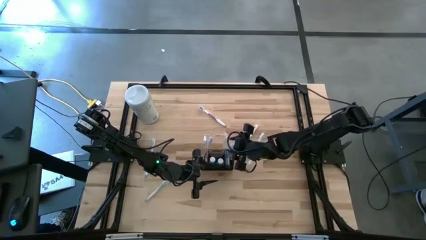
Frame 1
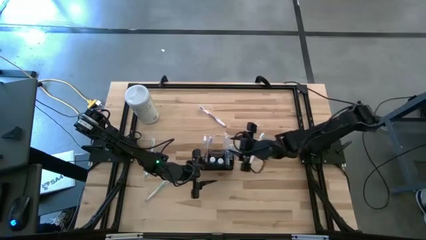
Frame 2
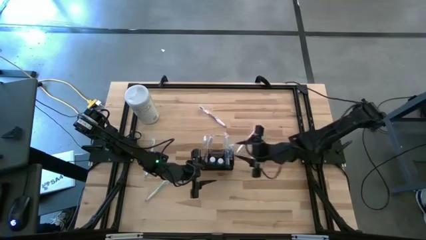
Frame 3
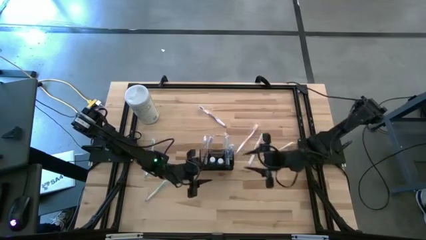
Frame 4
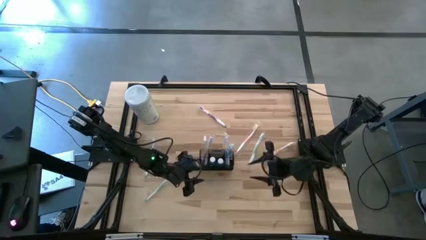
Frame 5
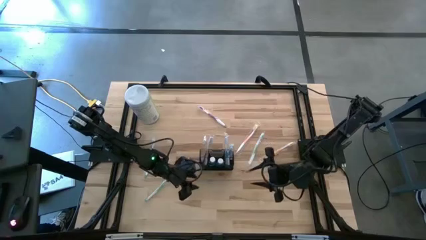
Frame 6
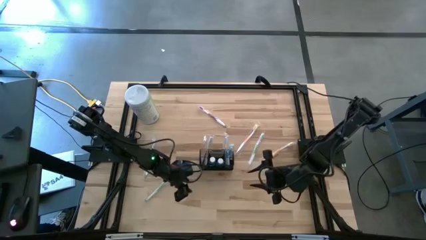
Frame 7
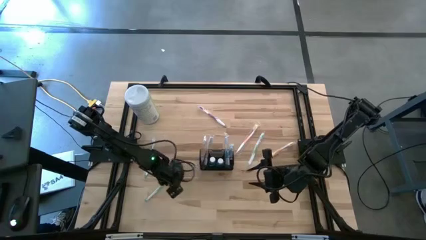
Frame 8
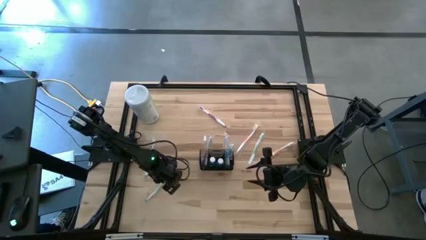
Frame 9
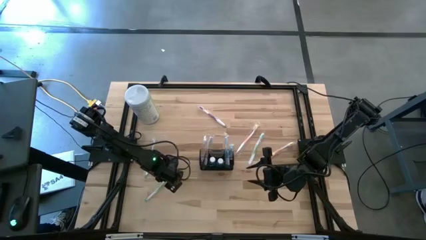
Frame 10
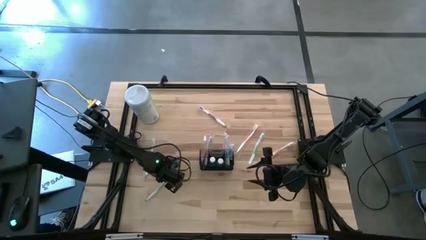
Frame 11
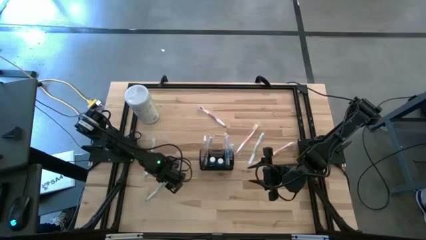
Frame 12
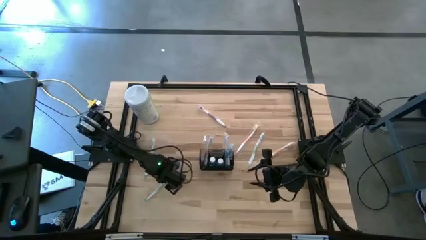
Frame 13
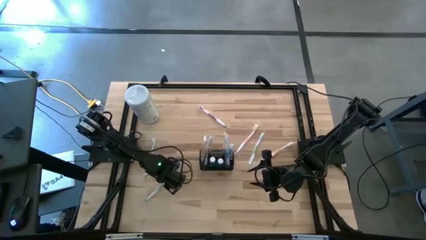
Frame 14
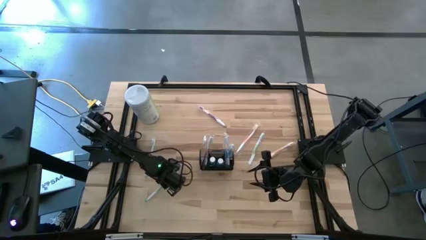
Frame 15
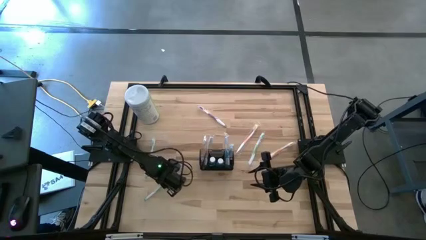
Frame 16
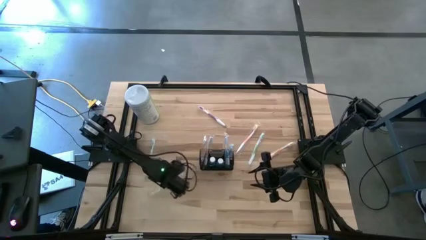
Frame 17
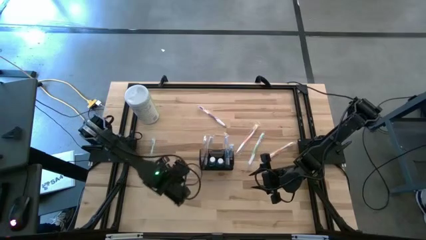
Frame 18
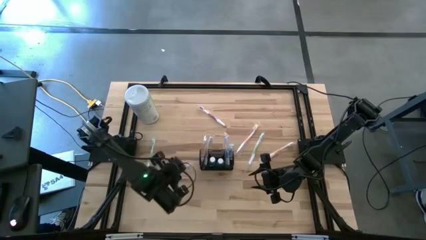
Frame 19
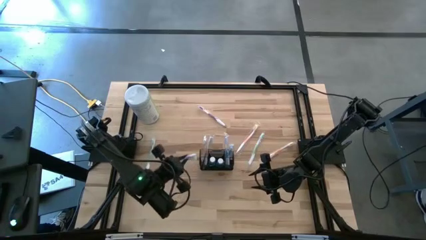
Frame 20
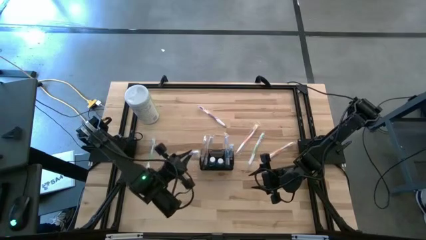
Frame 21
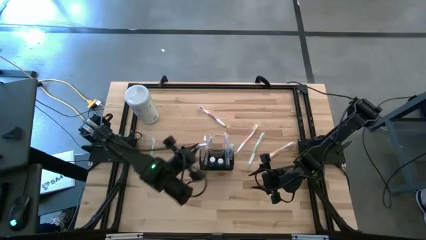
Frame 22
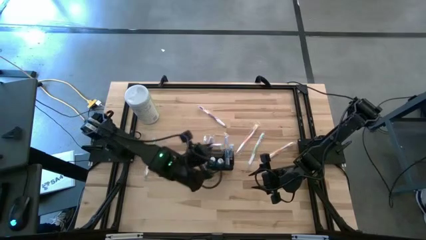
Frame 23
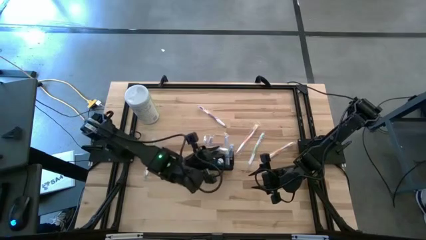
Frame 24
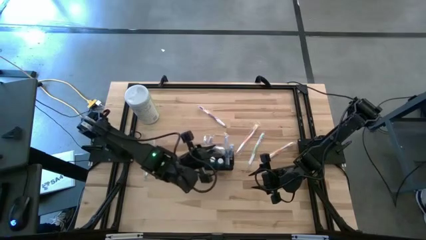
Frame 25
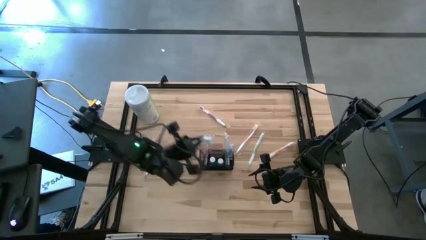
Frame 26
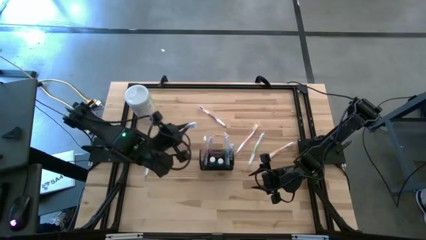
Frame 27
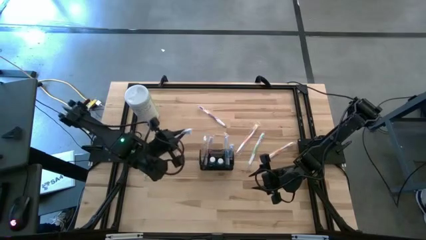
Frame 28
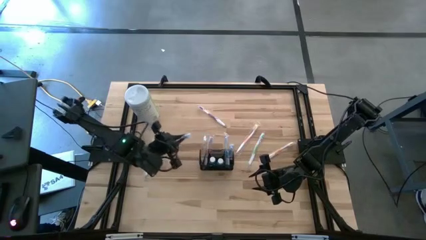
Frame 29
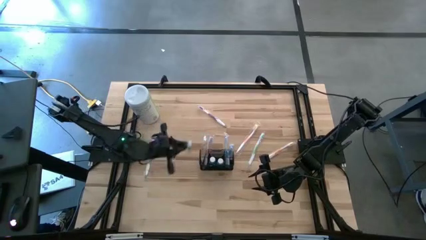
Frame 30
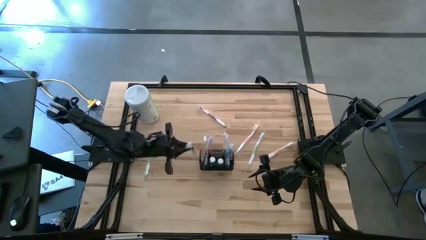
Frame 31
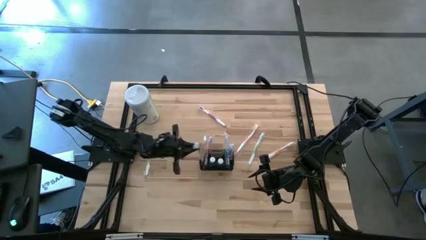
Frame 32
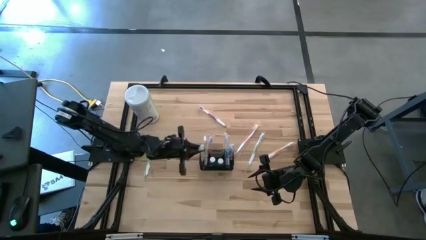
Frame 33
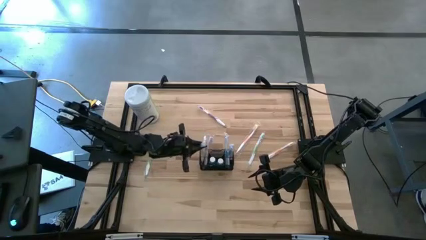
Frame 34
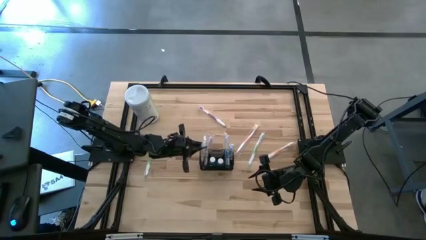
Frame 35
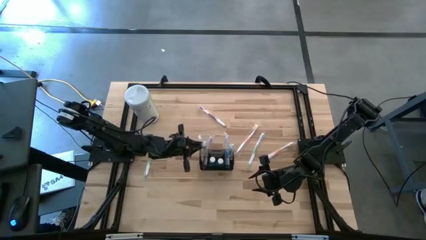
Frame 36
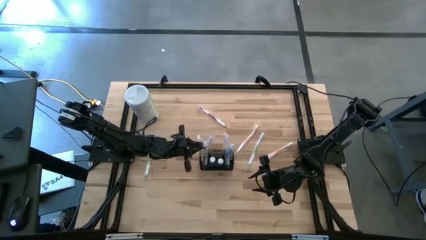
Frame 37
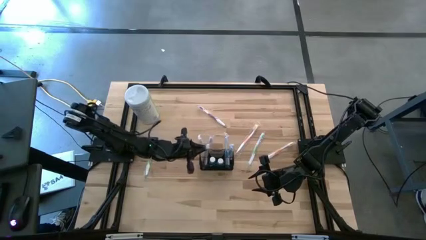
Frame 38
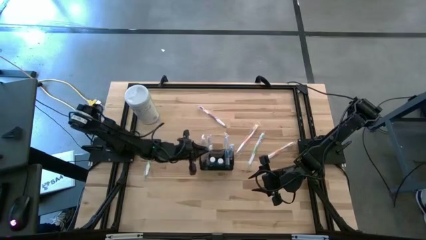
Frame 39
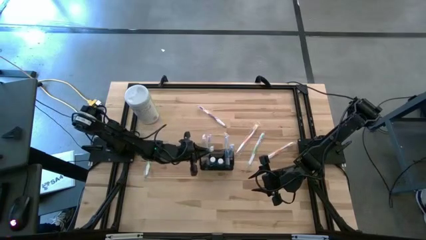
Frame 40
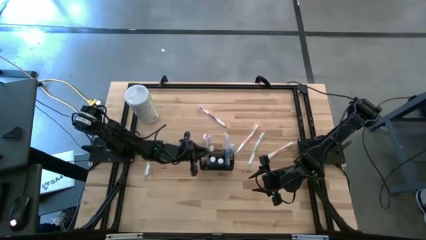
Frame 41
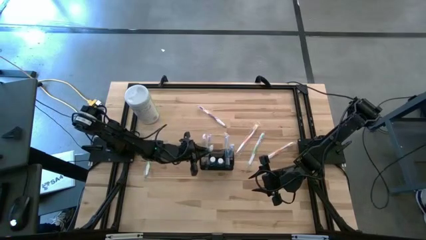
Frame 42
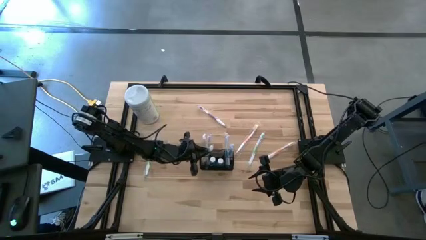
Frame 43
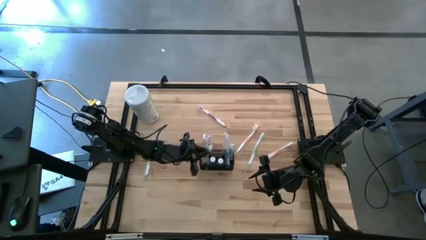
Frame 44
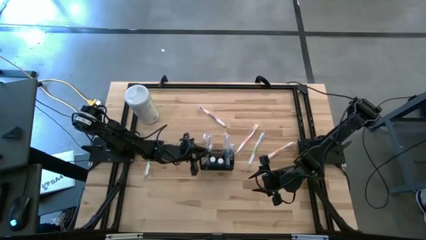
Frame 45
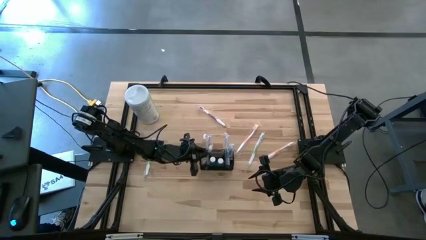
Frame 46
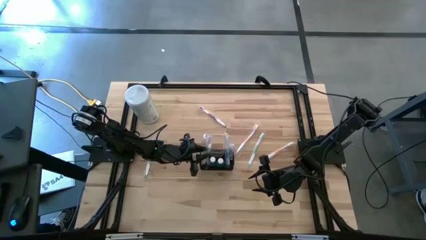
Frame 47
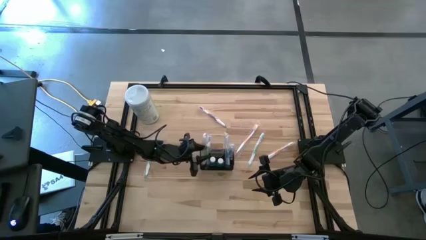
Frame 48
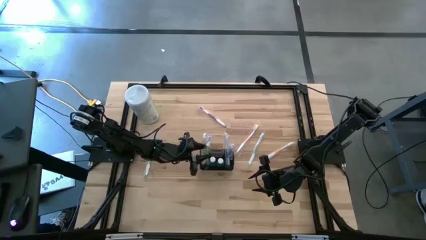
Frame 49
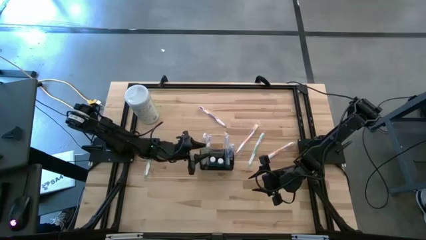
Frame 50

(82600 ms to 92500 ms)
Task: Pick & Place toothbrushing station
Put the bottom green toothbrush into the black wire organizer

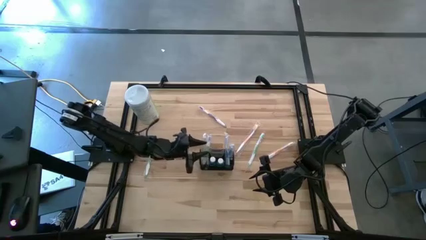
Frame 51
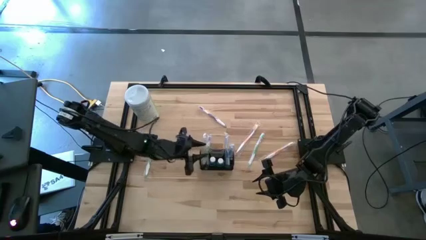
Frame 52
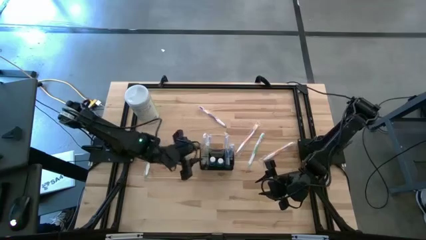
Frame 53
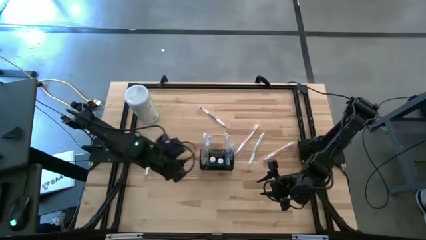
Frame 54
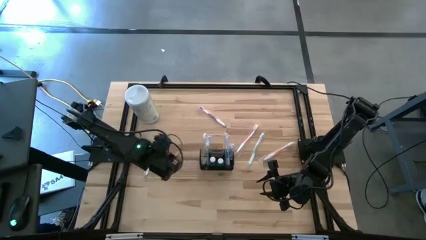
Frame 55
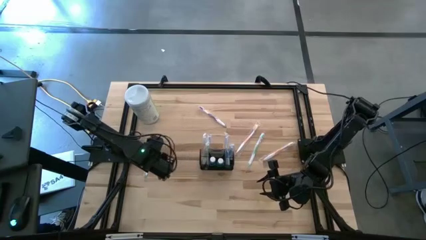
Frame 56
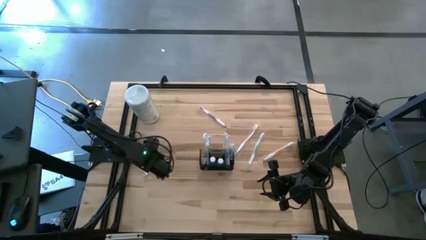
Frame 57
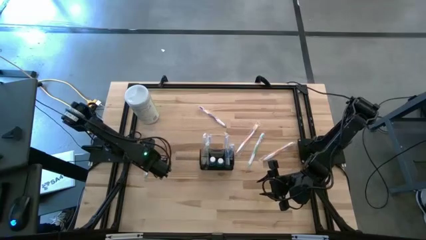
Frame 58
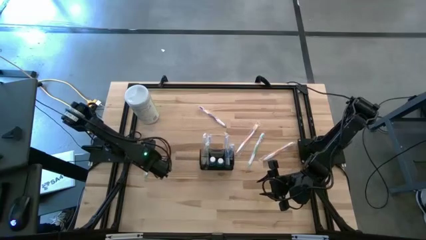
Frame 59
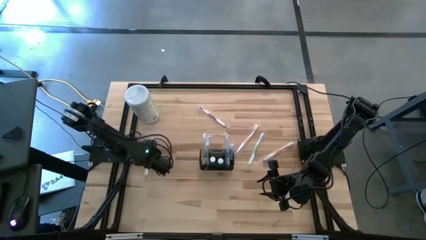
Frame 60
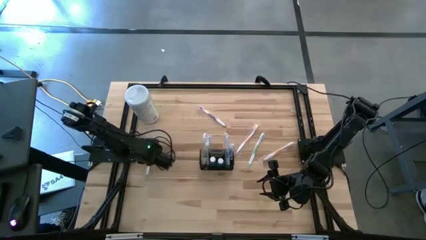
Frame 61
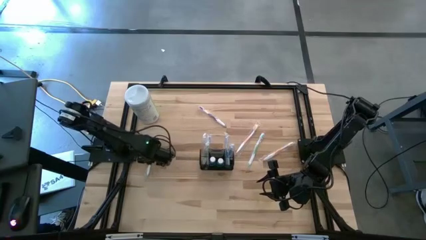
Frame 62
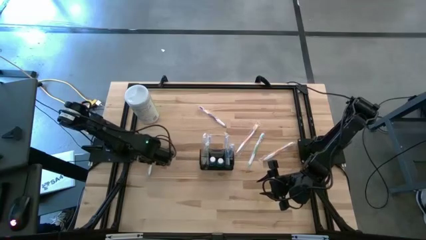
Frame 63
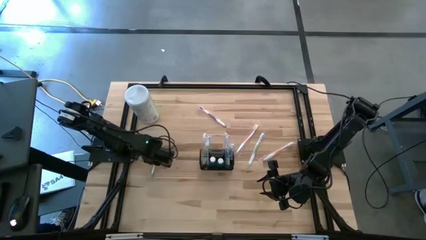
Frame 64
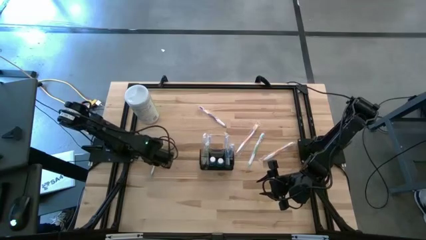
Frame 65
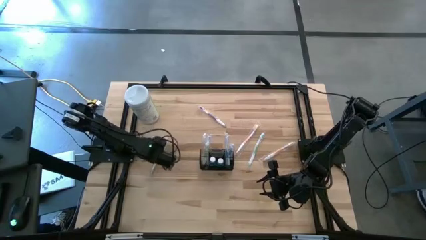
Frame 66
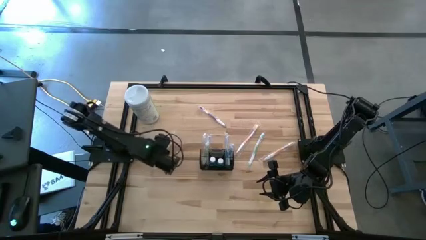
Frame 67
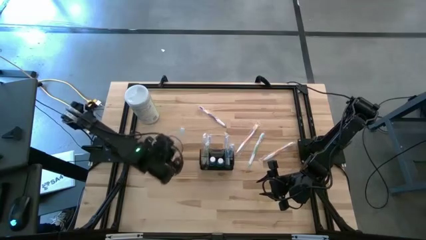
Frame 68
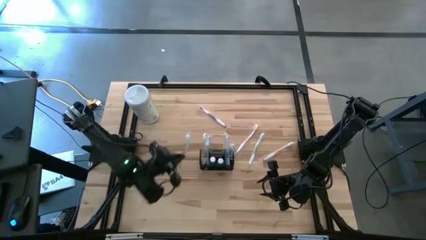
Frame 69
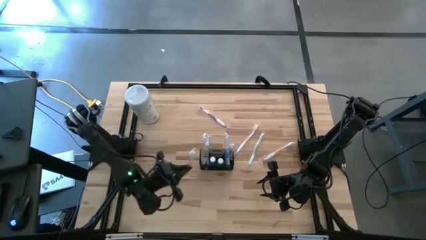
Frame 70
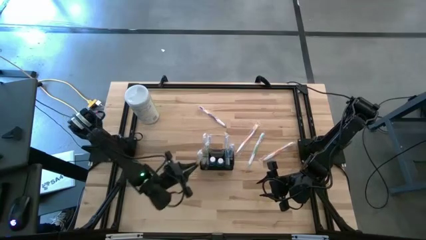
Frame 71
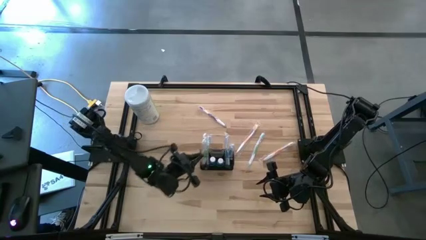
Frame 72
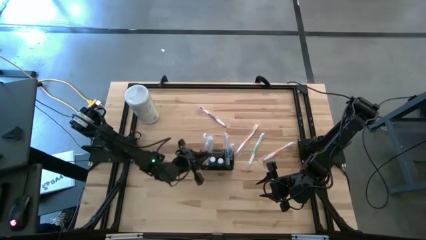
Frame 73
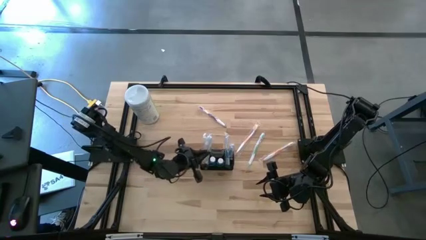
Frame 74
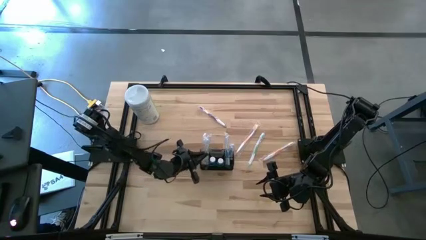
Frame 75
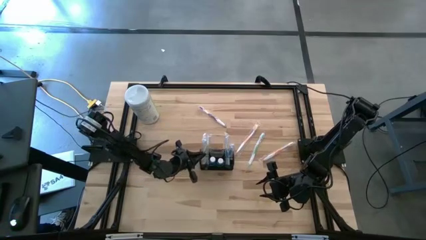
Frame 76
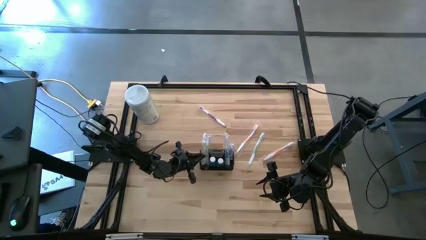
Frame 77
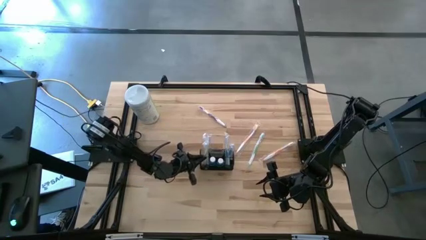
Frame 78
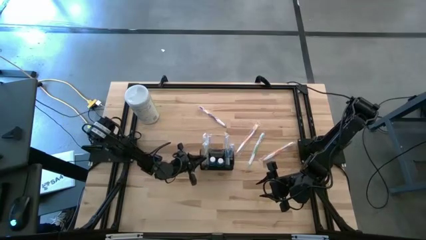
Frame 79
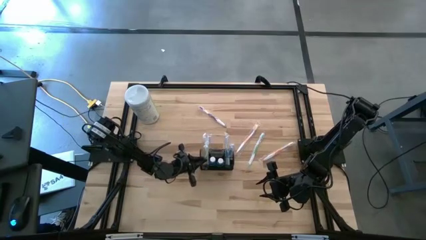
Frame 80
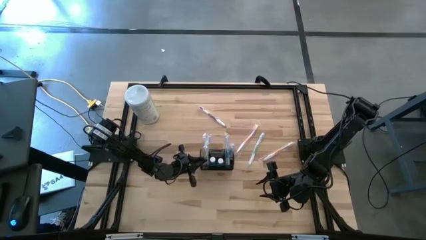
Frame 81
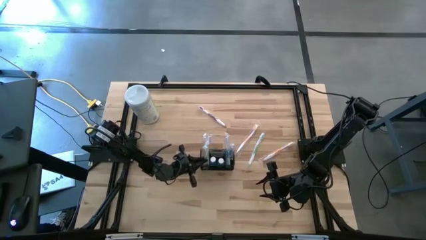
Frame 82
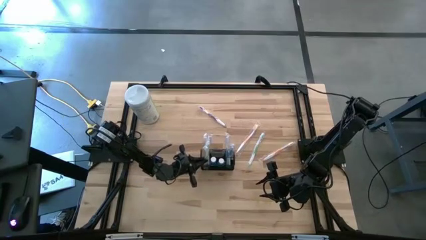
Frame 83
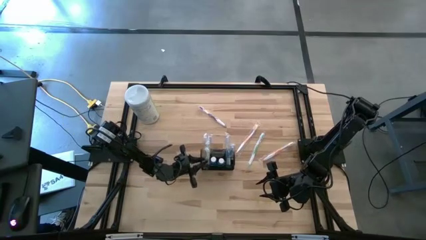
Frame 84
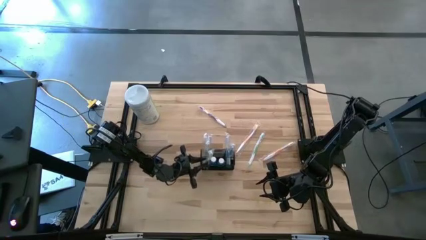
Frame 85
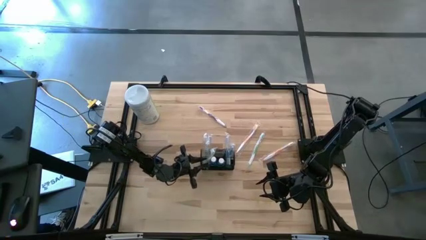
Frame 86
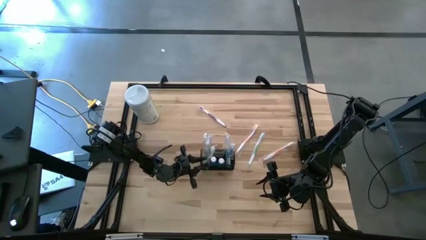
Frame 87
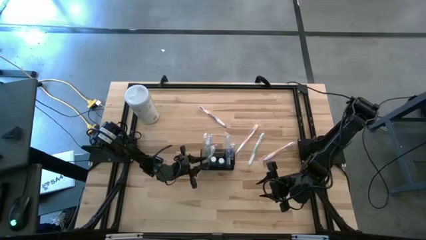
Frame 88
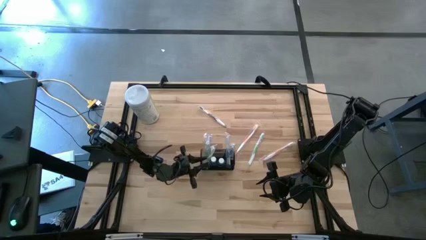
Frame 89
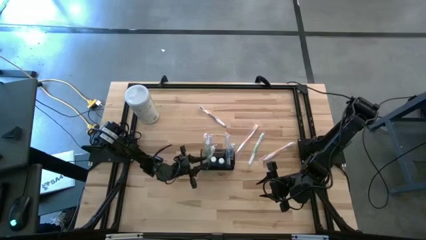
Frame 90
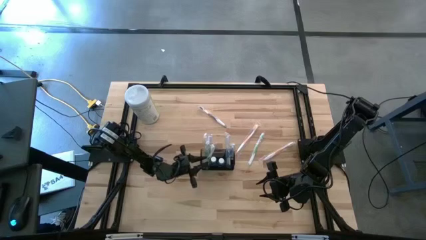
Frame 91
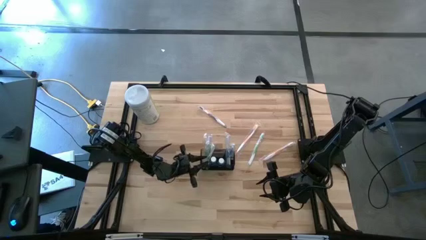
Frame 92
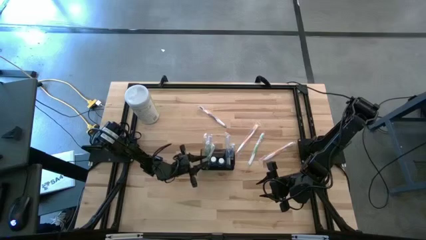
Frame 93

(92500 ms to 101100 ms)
Put the left green toothbrush into the black wire organizer
